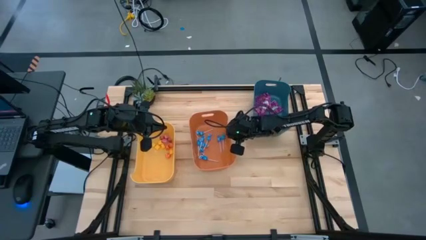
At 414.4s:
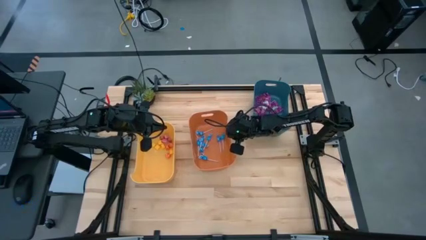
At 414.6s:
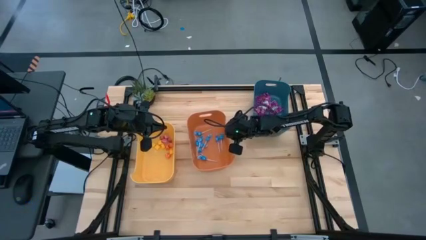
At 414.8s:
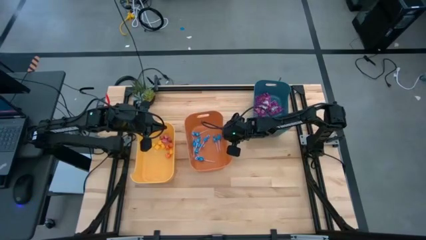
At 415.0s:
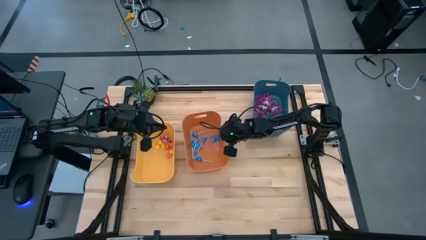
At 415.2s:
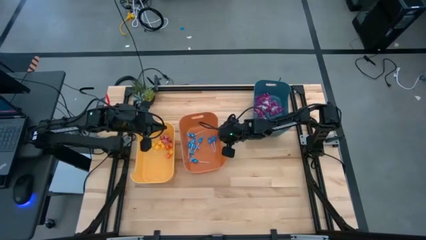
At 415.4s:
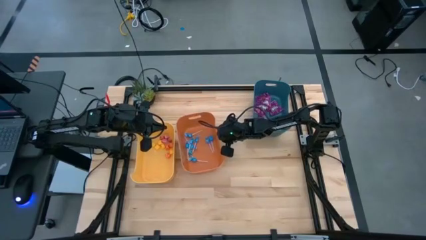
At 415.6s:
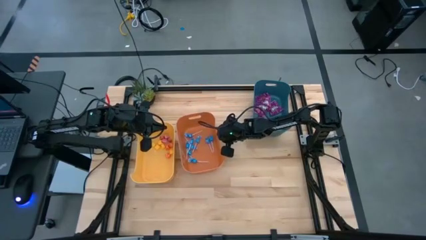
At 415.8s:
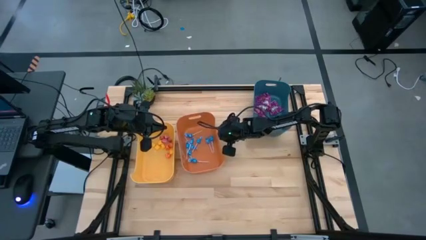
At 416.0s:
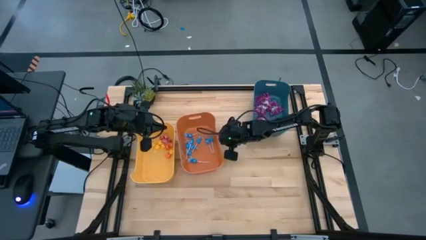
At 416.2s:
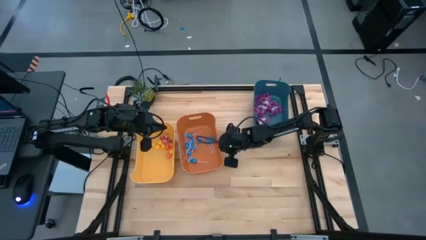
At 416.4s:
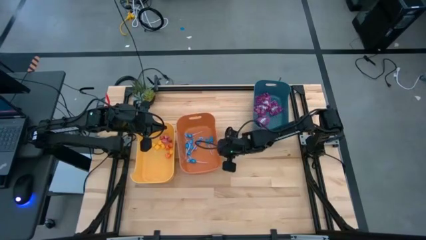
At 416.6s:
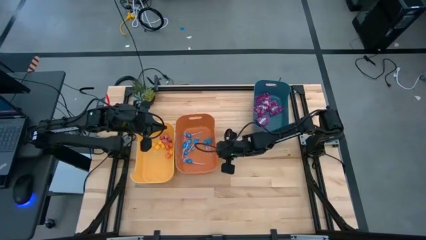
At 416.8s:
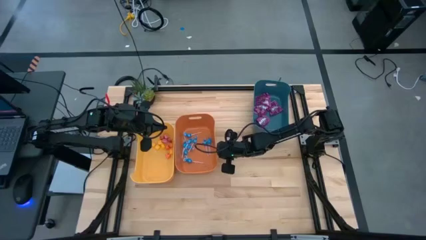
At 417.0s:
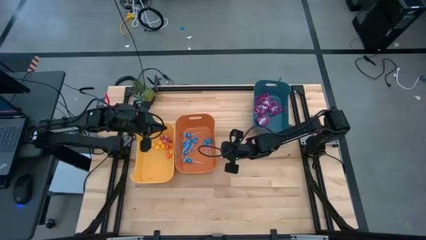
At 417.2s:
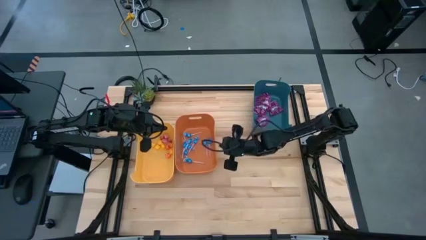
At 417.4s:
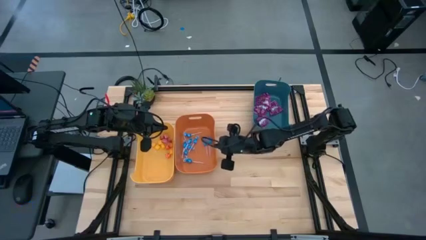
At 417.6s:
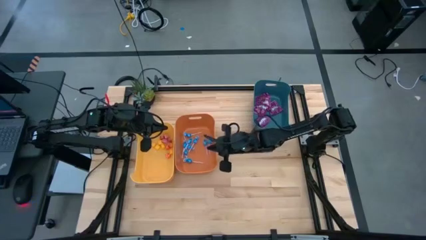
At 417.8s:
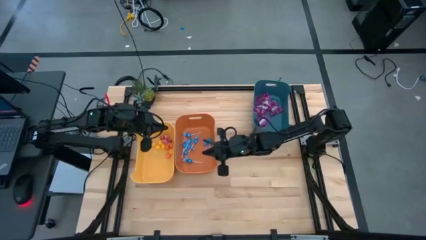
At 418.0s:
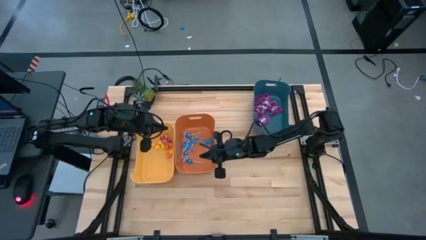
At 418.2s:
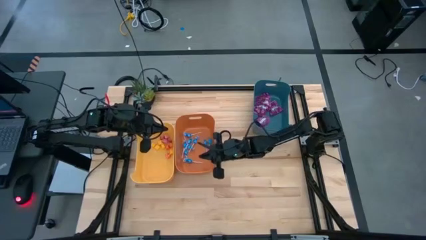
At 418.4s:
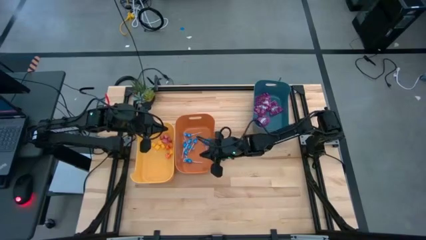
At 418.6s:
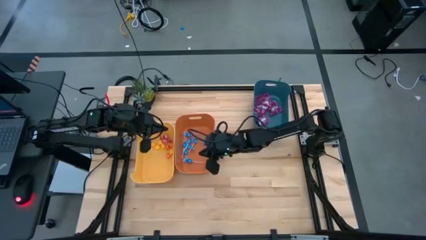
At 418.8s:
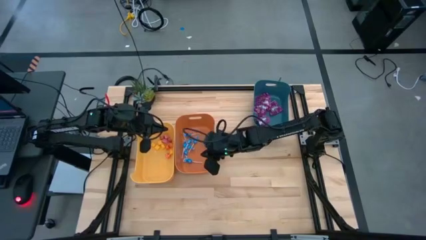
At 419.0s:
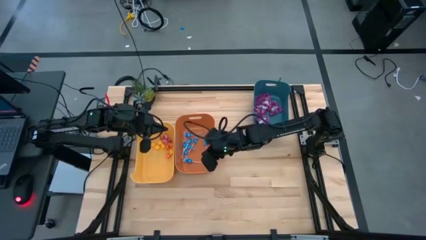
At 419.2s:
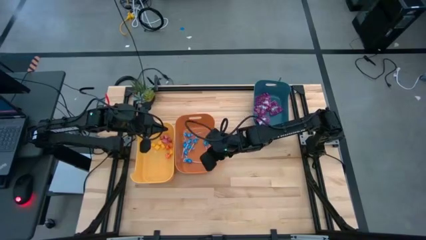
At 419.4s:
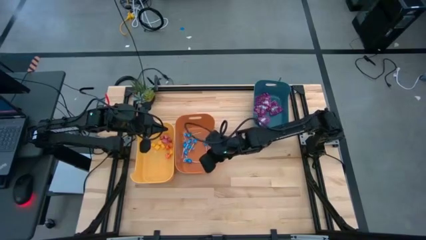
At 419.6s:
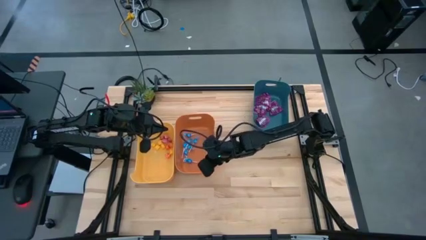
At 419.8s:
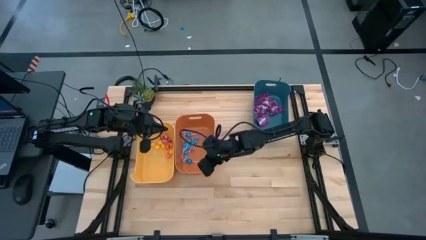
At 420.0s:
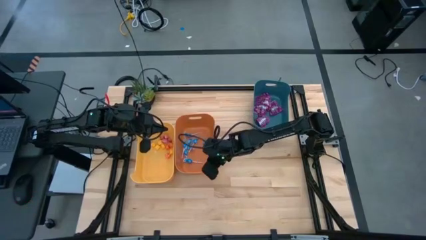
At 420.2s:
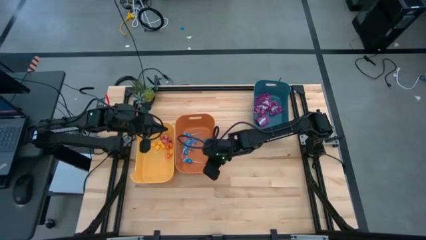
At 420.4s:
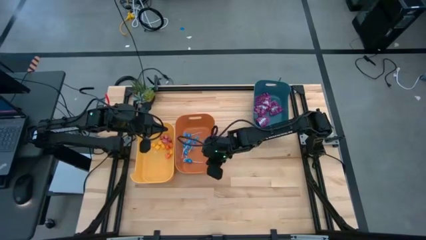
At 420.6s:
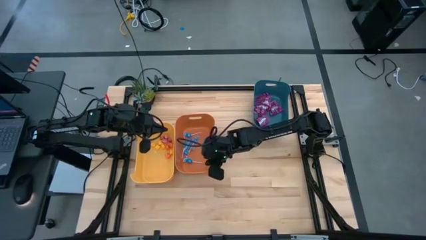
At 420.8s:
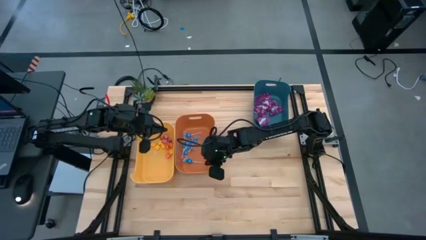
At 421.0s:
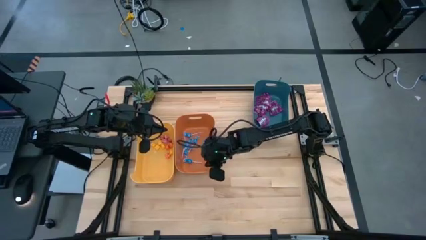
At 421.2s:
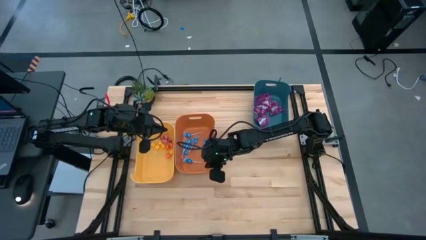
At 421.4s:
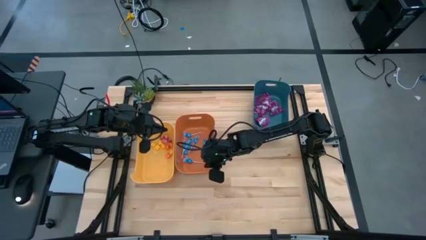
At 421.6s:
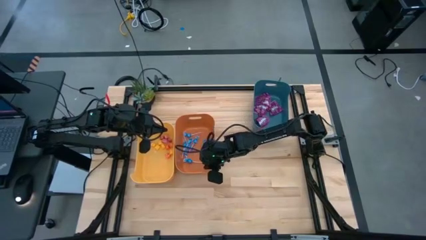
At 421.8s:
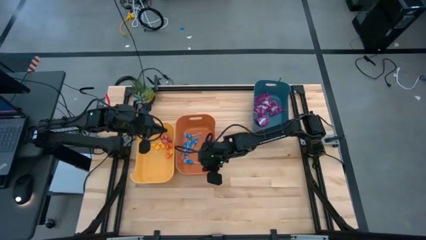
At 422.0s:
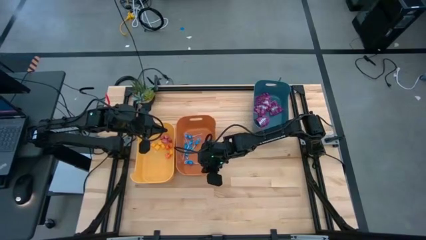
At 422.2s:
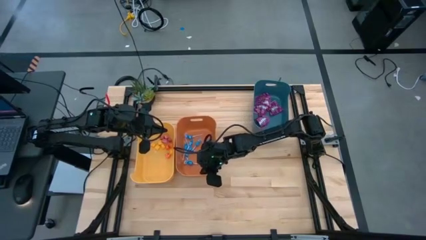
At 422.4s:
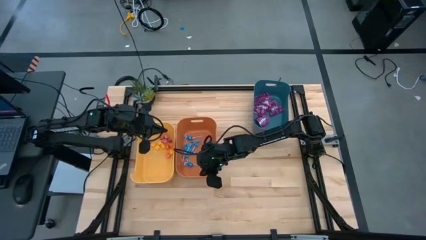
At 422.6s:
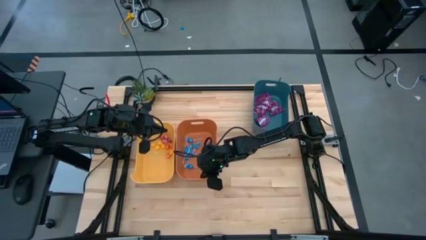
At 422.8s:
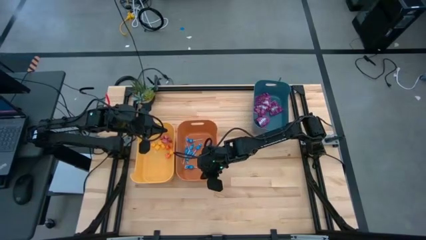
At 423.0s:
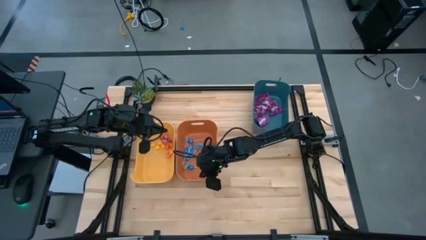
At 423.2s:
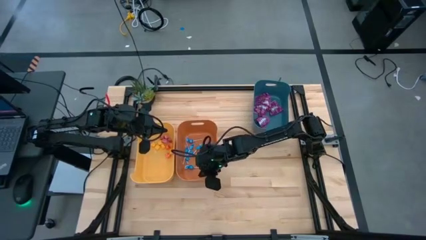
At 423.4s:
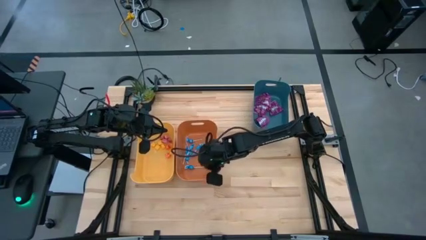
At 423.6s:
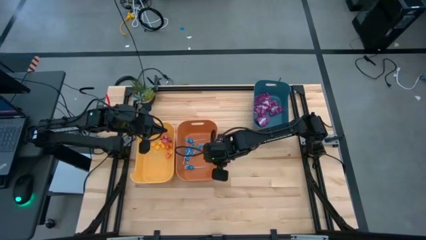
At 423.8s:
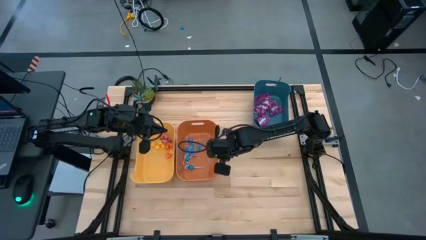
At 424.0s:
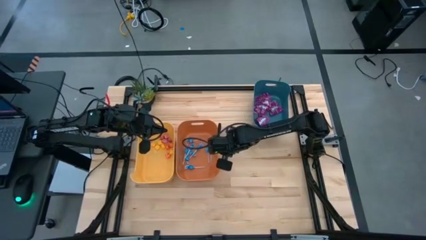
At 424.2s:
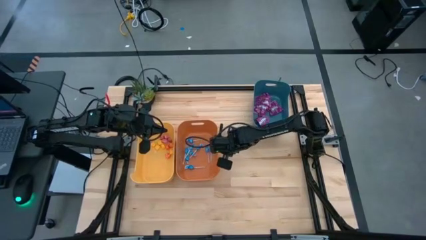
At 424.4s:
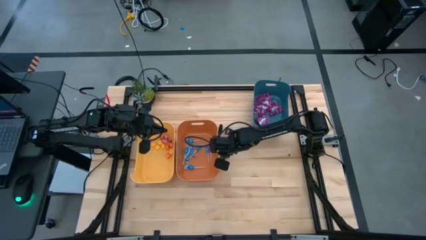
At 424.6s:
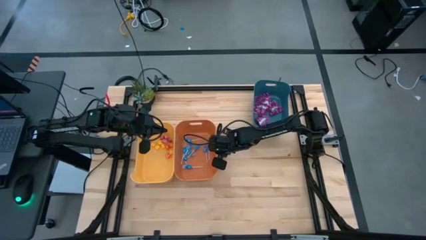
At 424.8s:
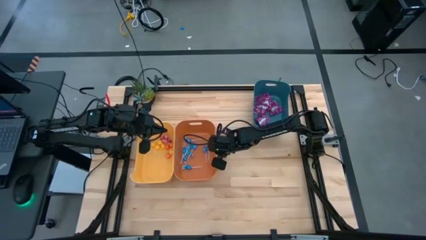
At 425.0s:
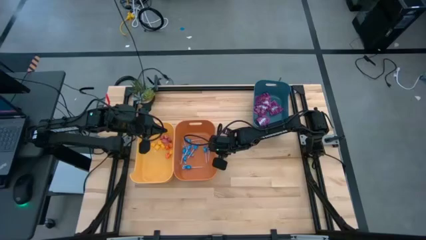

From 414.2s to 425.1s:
Task: Sort candy
Move the orange bin beside the yellow bin
